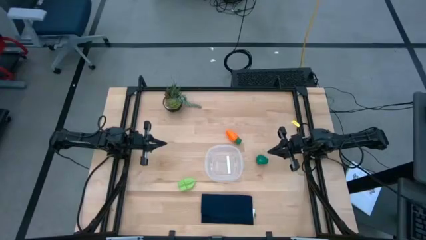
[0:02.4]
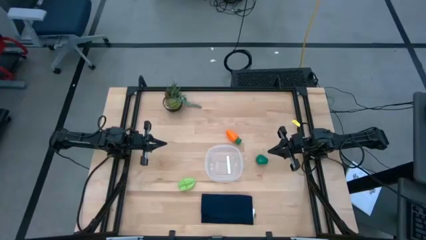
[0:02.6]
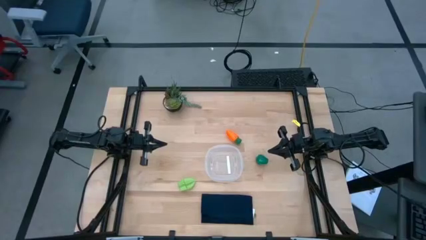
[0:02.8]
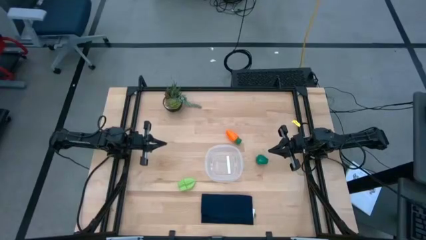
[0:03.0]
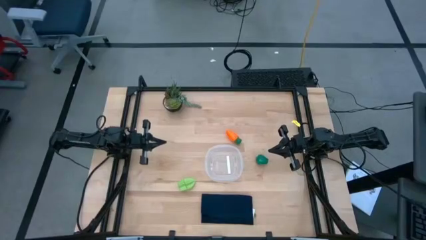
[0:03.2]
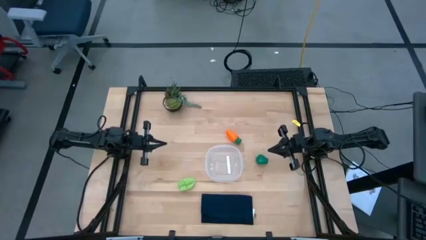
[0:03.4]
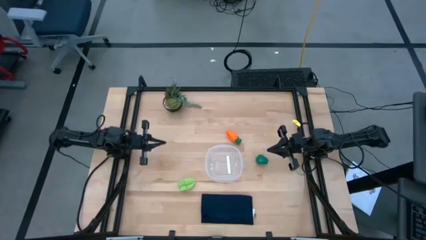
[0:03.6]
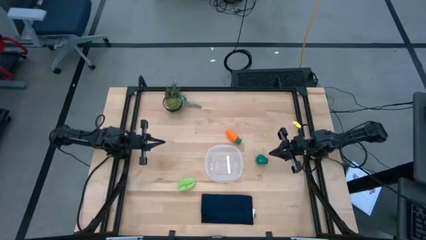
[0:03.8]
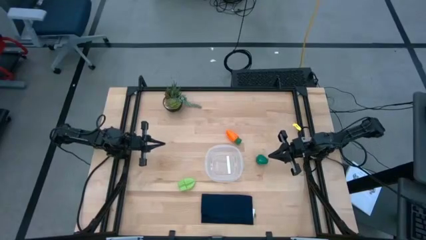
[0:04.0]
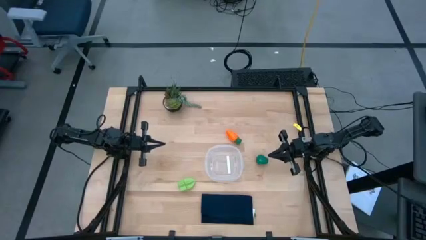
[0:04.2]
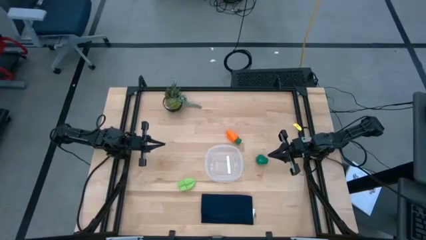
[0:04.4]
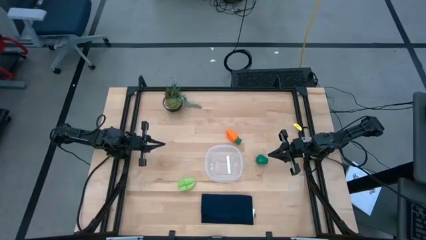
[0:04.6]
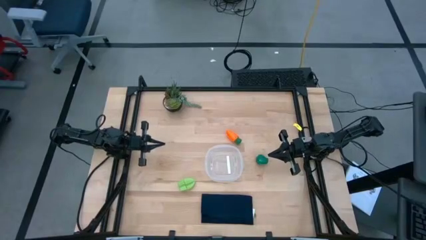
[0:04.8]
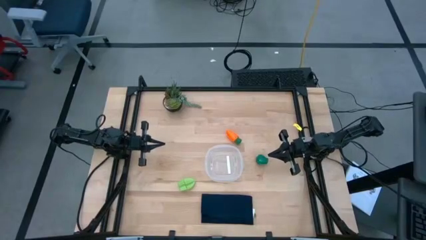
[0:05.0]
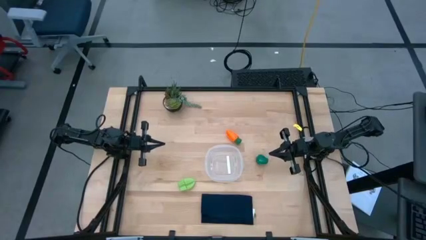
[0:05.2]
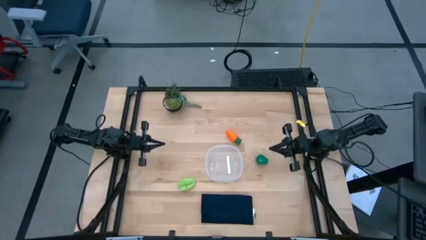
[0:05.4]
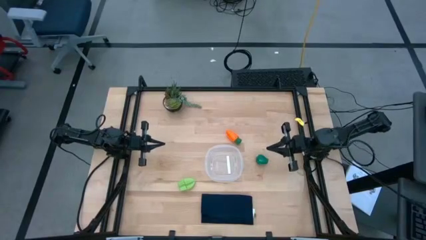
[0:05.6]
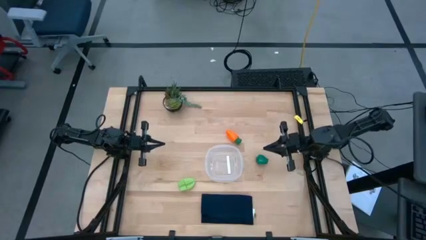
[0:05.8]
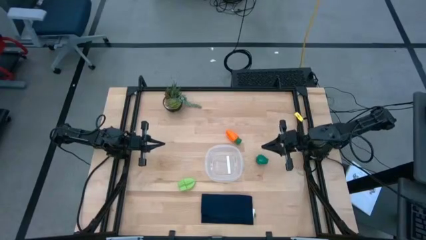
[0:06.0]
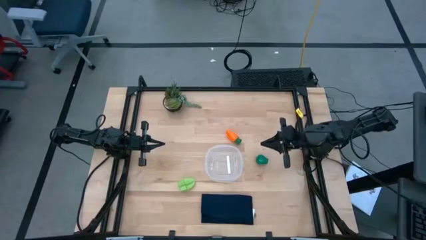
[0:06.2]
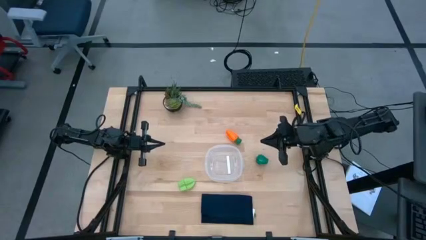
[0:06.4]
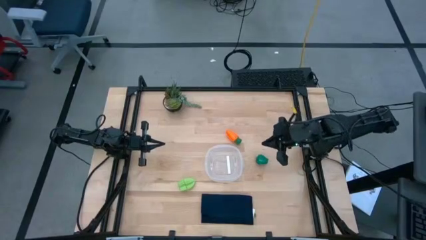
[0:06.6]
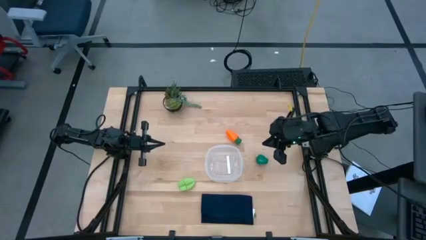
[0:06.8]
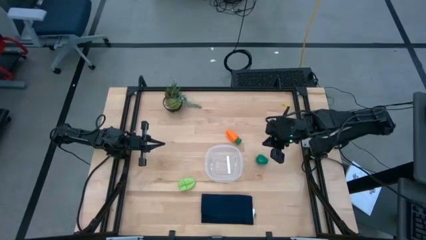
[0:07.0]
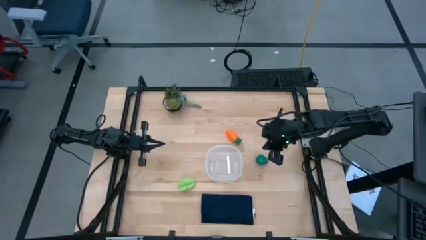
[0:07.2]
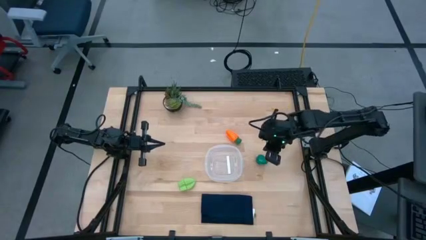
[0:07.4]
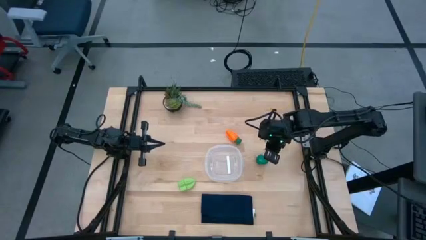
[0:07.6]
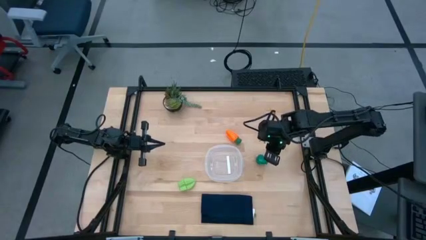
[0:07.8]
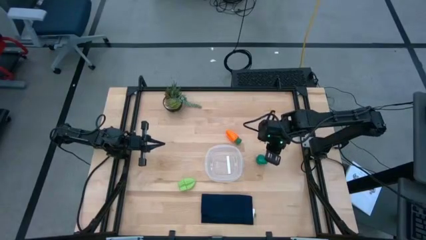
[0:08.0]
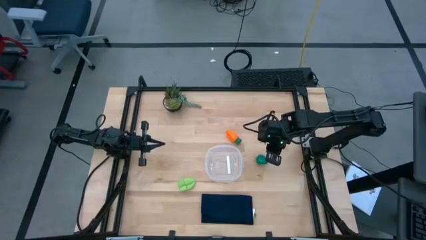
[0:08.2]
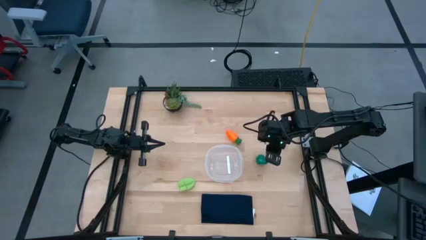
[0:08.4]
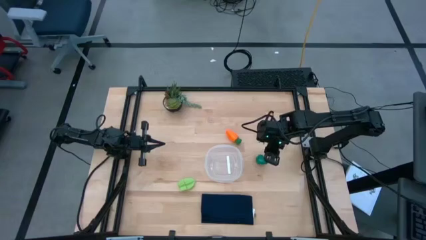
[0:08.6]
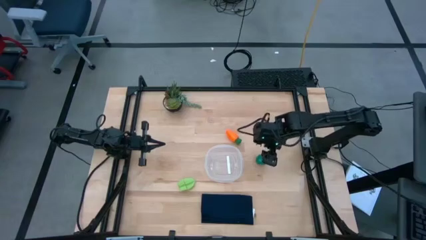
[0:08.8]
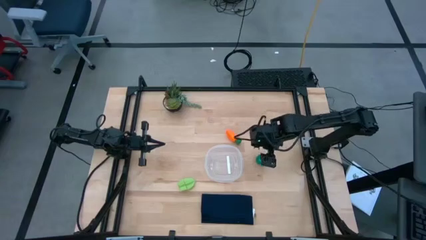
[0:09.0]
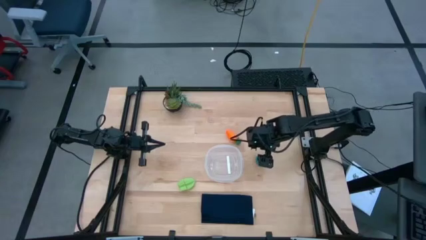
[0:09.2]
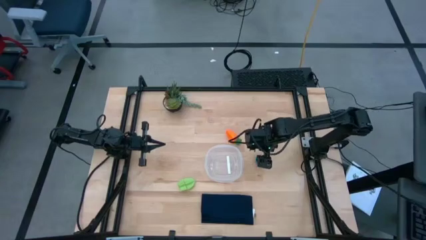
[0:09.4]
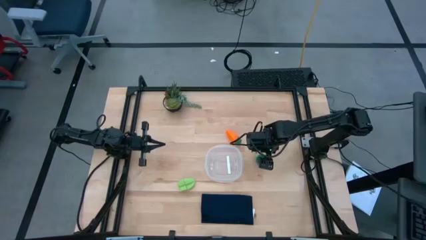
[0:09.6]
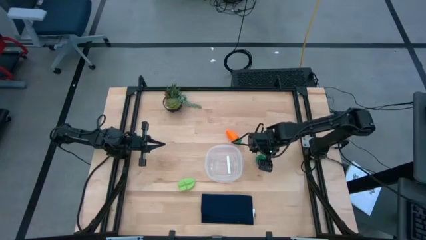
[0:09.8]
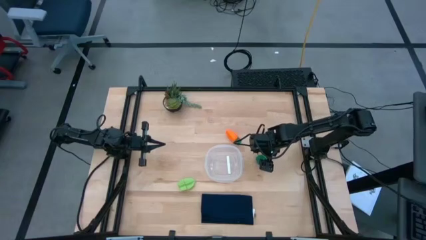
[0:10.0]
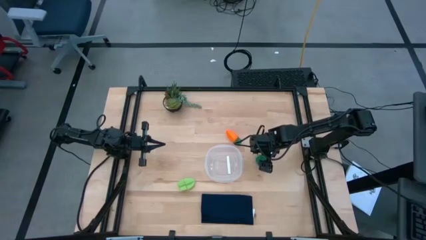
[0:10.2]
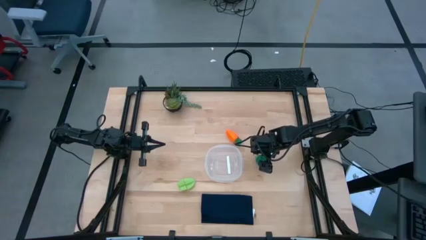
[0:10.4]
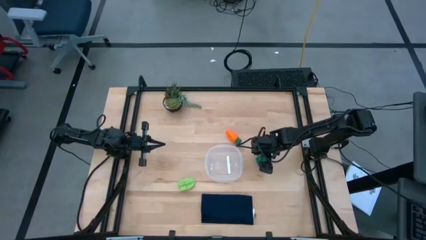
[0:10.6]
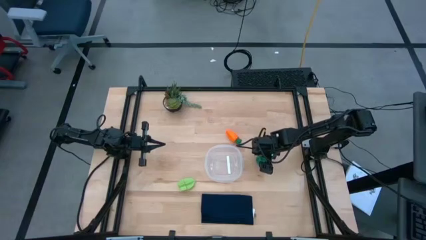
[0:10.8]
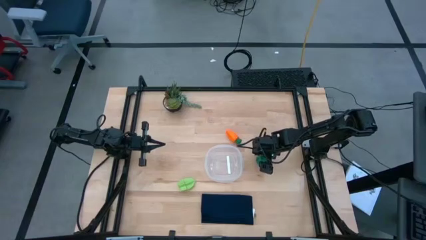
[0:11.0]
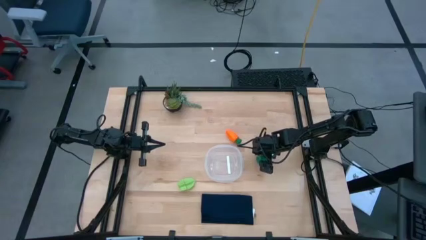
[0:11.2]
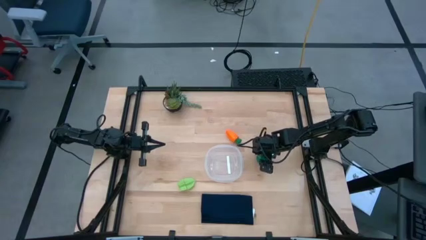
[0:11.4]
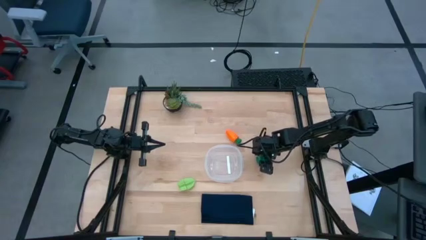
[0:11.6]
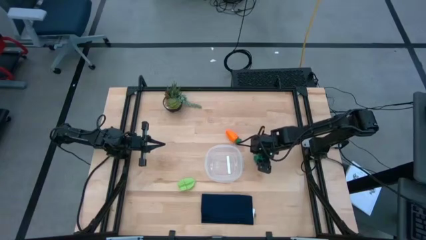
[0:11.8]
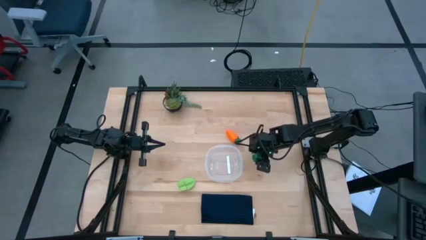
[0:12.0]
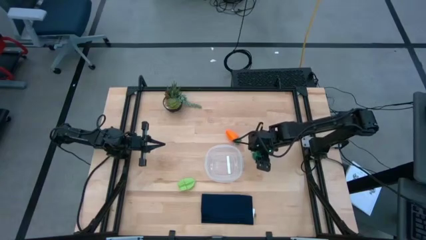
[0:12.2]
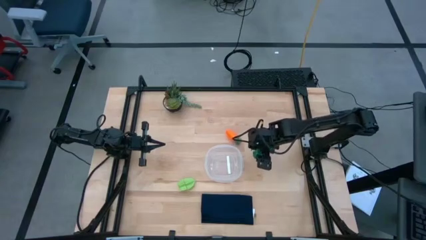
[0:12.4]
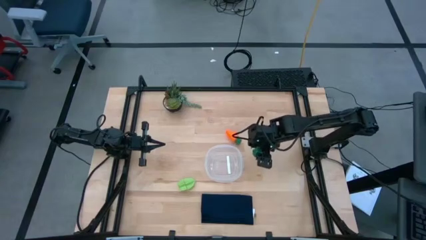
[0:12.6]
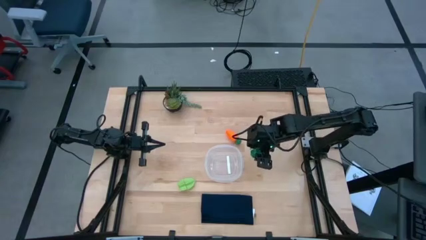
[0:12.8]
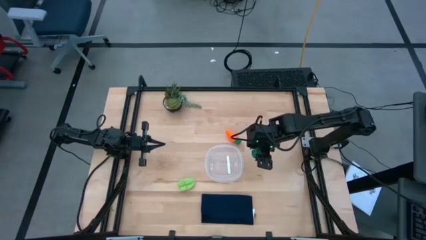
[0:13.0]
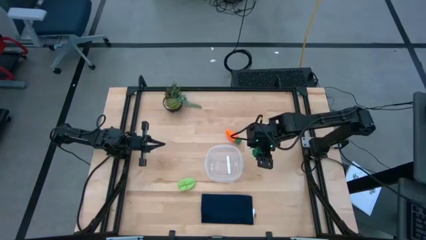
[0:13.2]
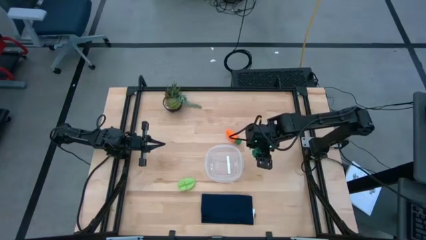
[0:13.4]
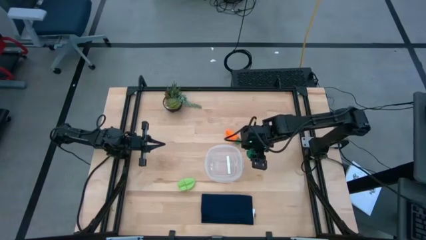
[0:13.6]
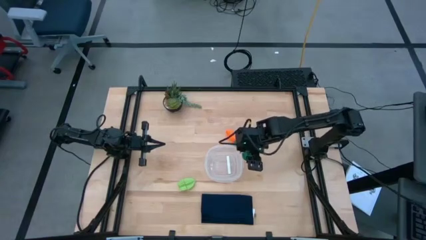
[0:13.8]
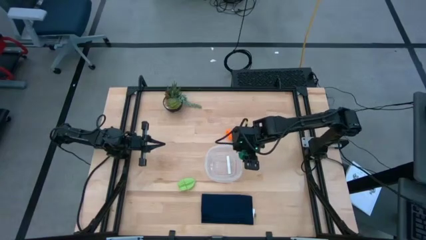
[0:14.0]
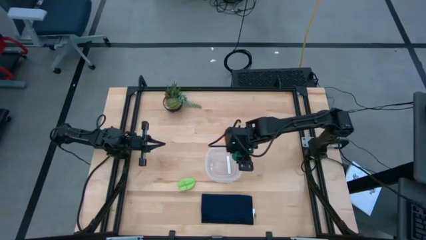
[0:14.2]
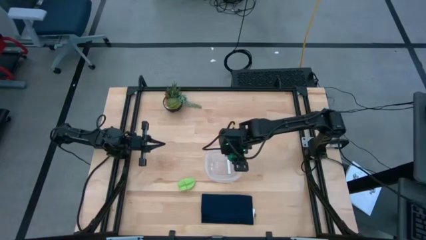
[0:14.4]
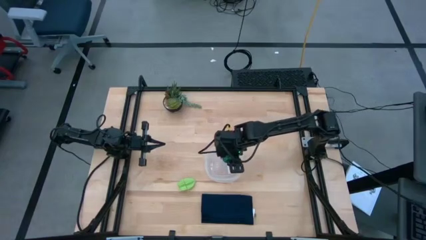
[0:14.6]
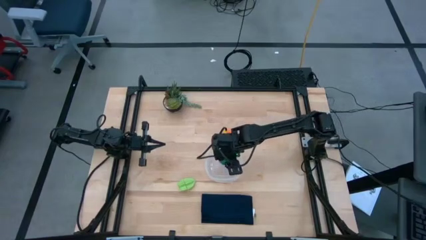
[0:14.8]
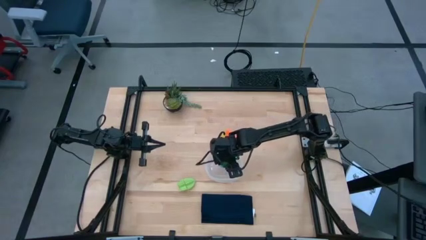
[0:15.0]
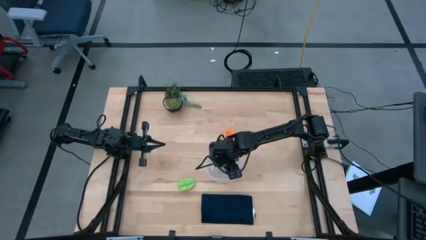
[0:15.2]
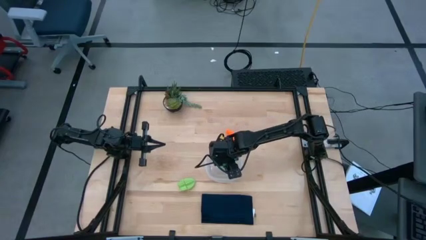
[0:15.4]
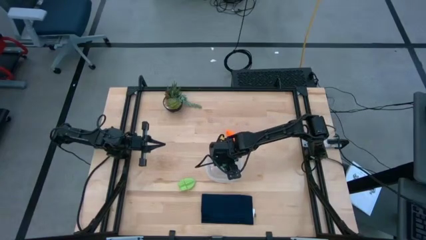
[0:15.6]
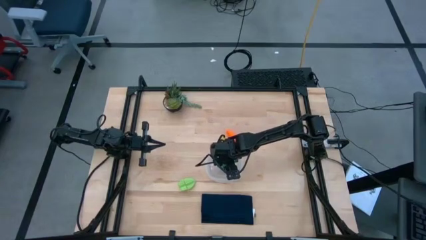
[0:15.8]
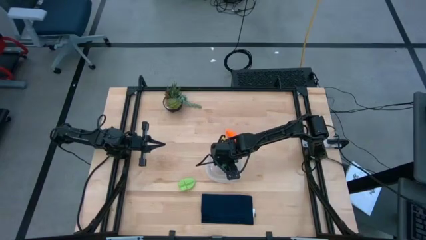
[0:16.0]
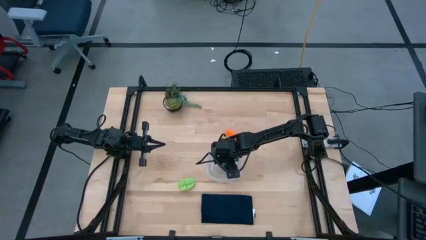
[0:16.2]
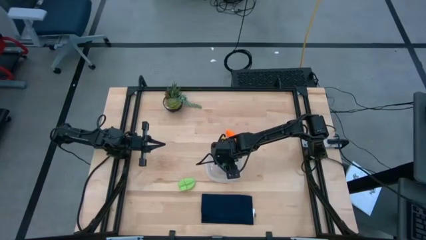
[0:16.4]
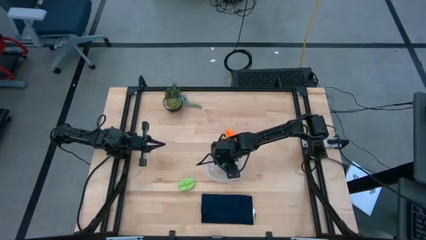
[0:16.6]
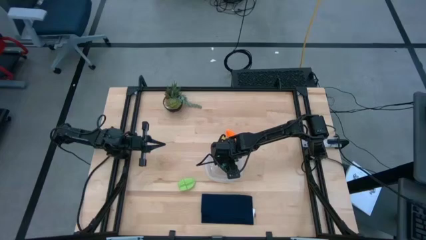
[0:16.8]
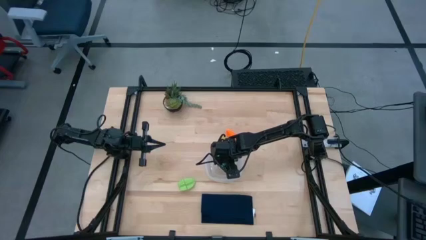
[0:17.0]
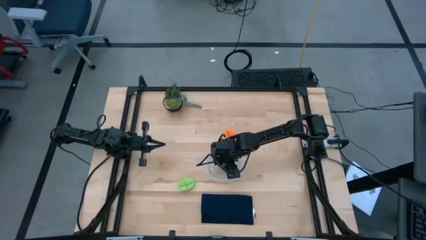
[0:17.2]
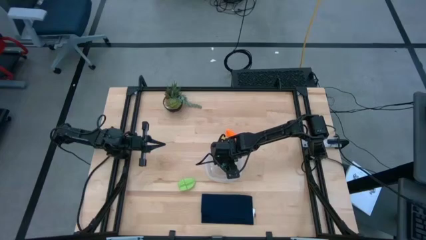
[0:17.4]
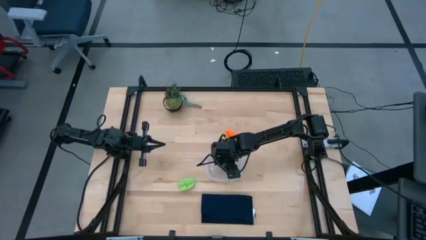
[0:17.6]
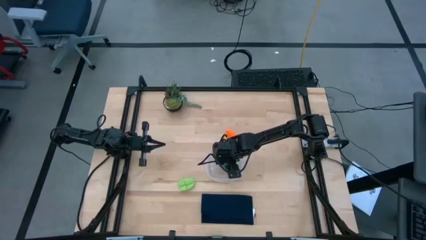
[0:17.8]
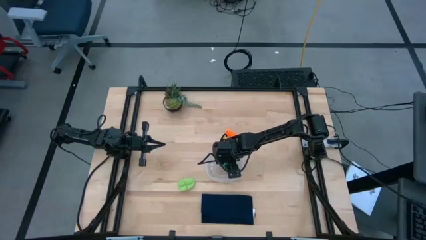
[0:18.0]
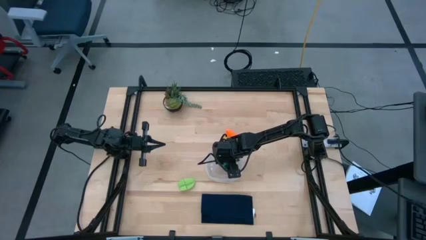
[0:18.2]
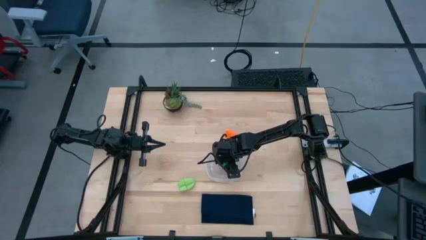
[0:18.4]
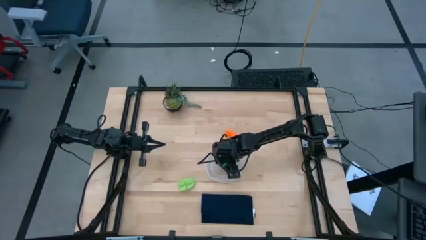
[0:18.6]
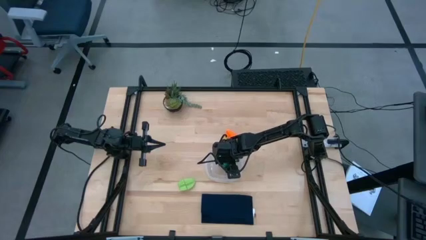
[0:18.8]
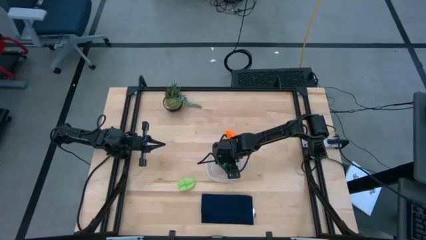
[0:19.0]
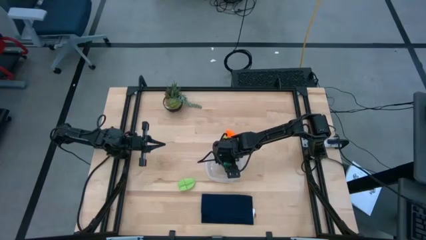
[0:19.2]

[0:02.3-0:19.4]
Task: Pick and placing Produce into tupperware
Put the green bell pepper into the transparent bin
